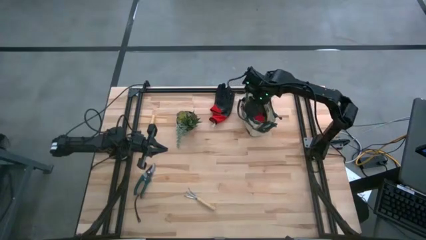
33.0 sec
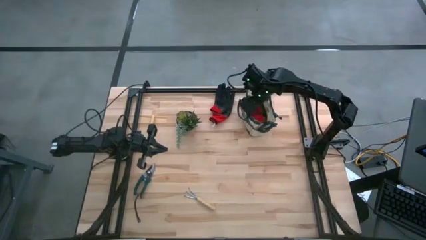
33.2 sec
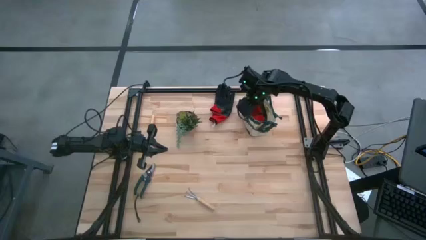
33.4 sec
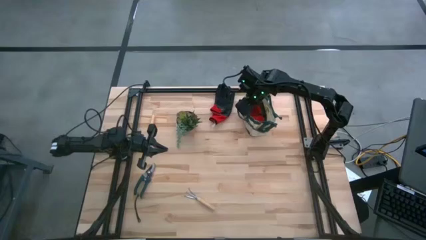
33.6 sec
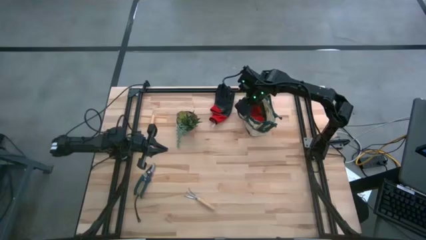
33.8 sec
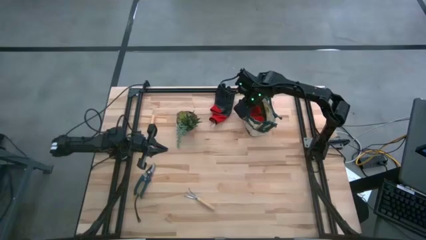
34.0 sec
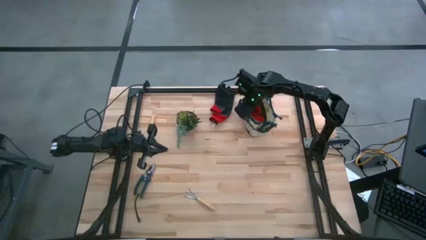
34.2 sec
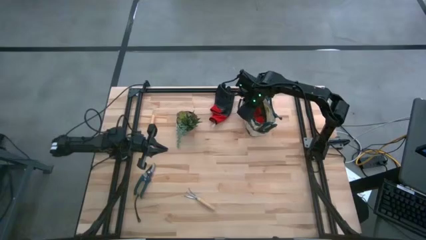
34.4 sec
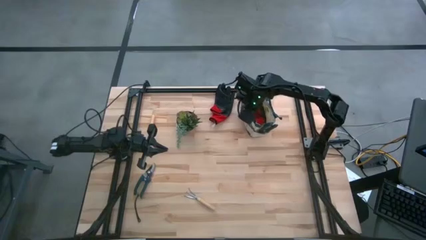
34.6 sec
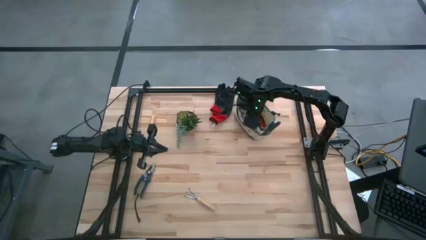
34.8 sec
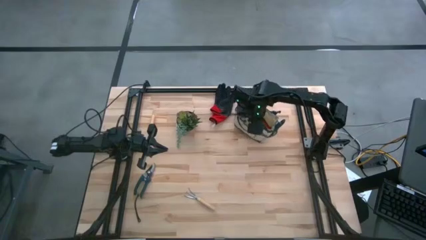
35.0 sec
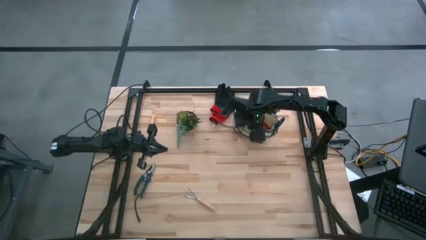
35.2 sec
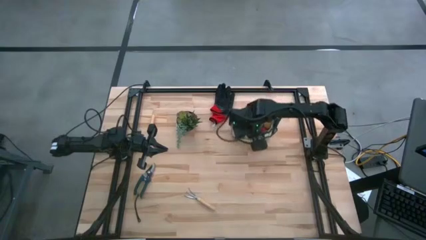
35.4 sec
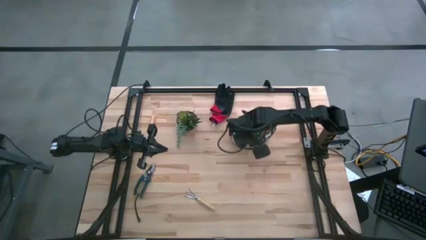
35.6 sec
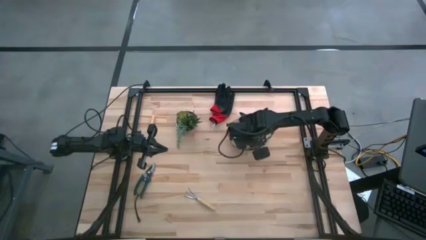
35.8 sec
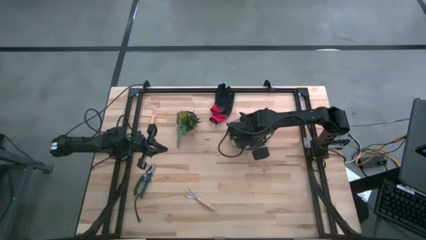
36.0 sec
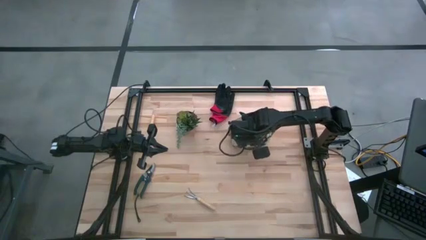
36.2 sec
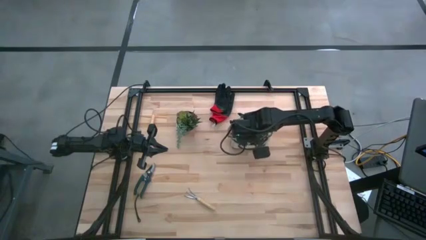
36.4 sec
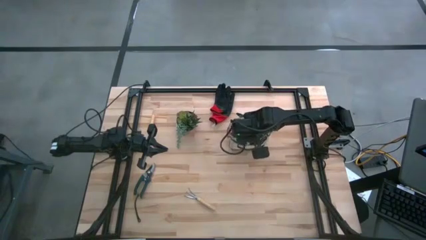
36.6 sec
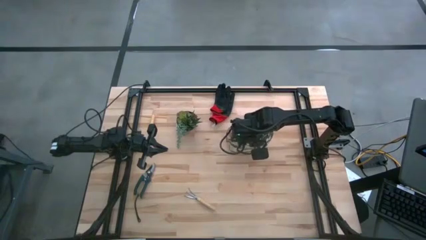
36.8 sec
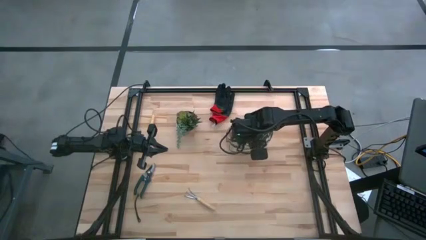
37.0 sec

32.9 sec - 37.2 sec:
Task: Pick & Place Garden tools in Gardening bag
Adjust the gardening bag

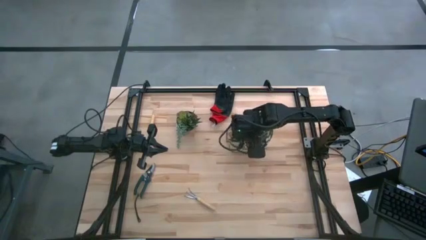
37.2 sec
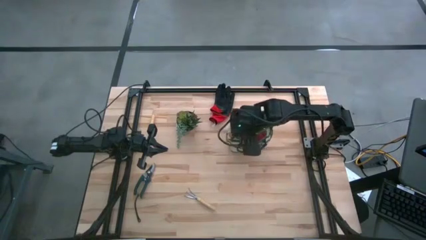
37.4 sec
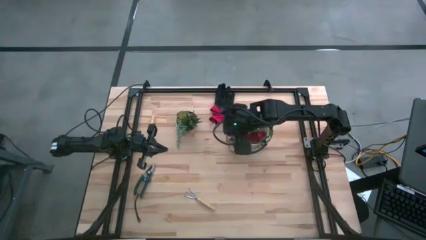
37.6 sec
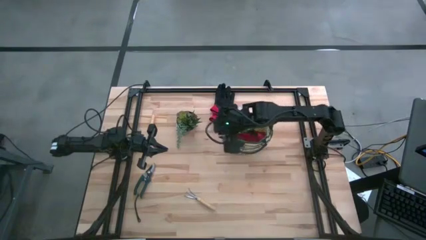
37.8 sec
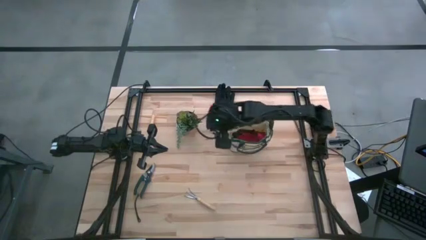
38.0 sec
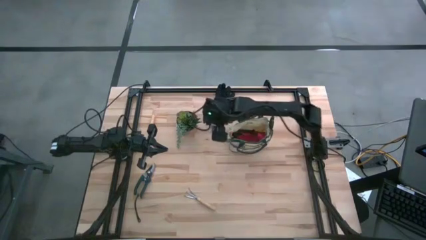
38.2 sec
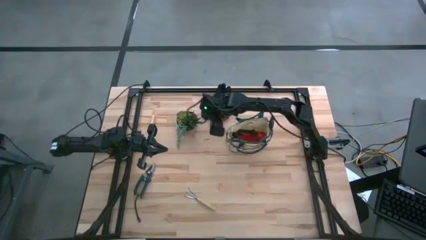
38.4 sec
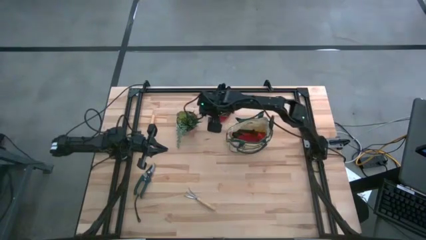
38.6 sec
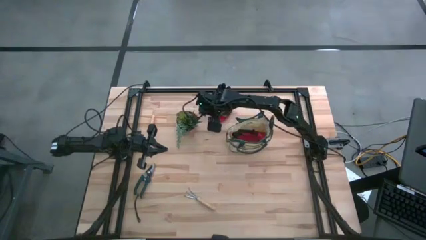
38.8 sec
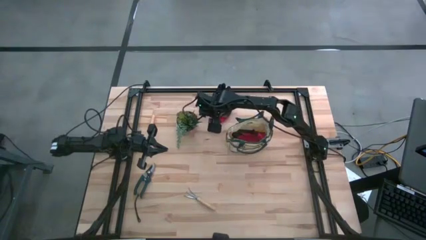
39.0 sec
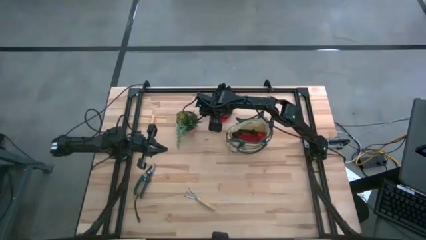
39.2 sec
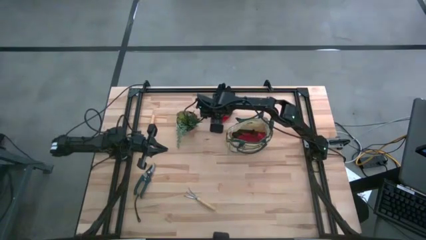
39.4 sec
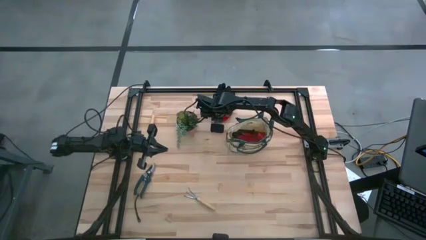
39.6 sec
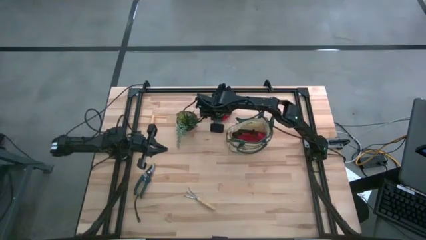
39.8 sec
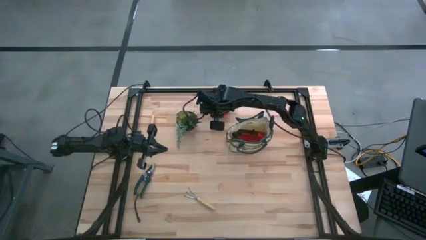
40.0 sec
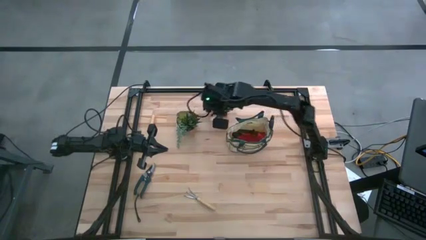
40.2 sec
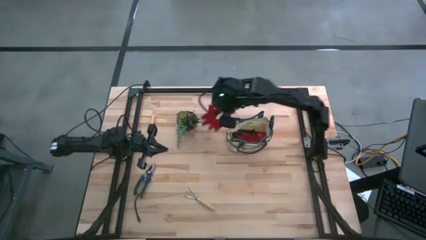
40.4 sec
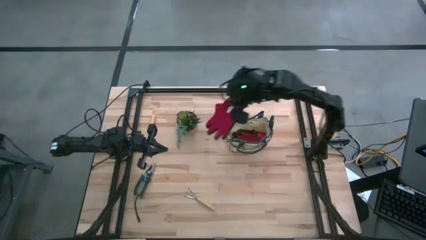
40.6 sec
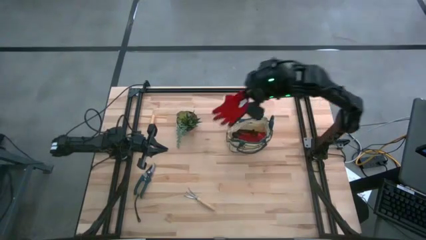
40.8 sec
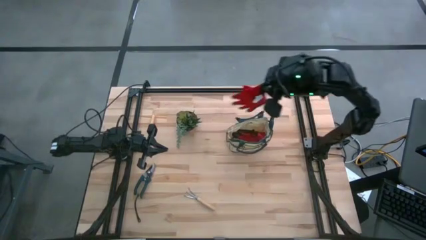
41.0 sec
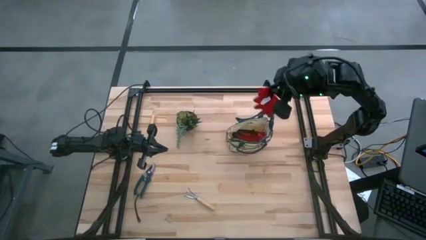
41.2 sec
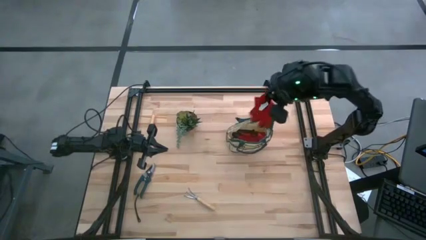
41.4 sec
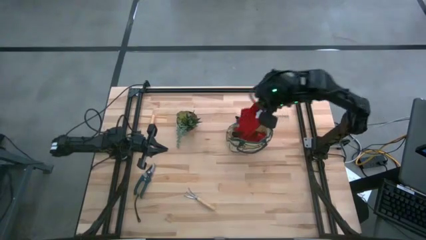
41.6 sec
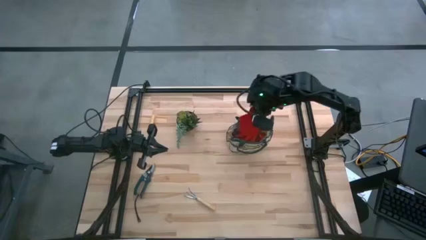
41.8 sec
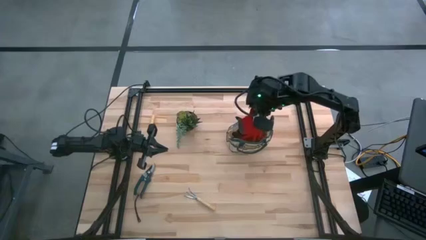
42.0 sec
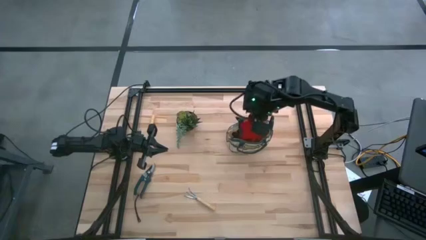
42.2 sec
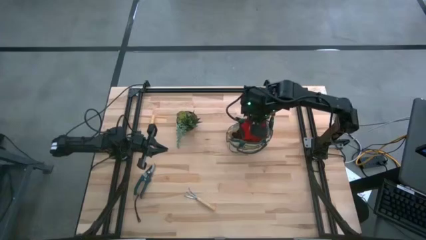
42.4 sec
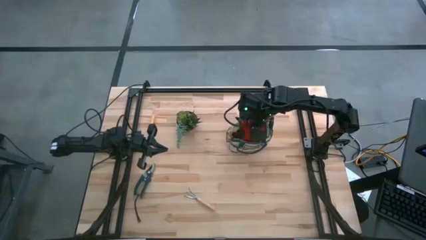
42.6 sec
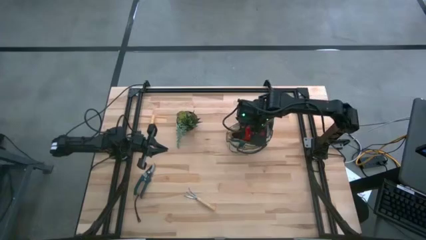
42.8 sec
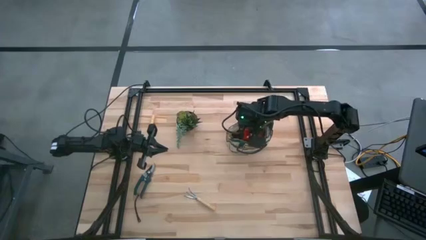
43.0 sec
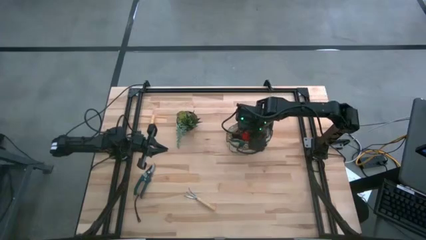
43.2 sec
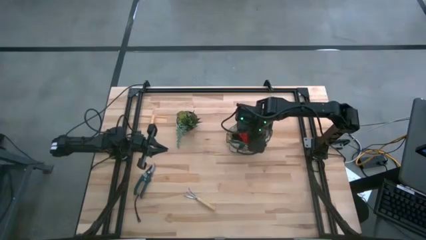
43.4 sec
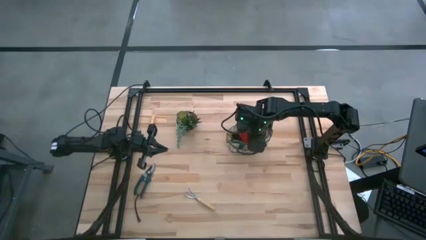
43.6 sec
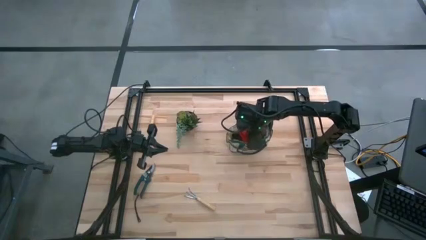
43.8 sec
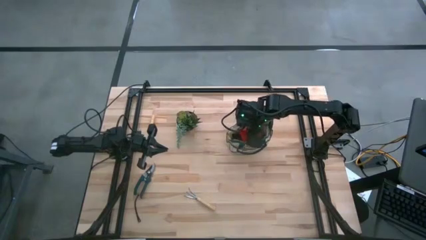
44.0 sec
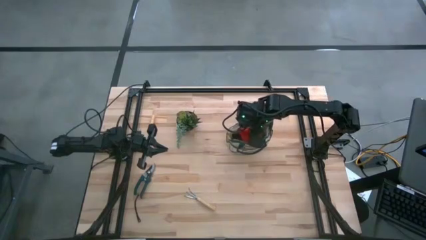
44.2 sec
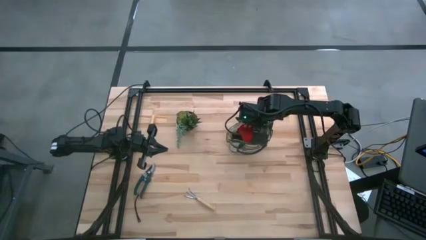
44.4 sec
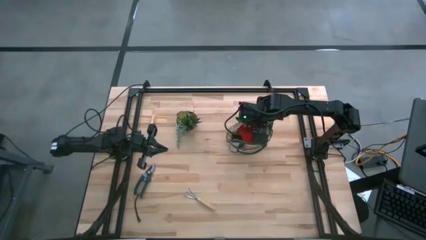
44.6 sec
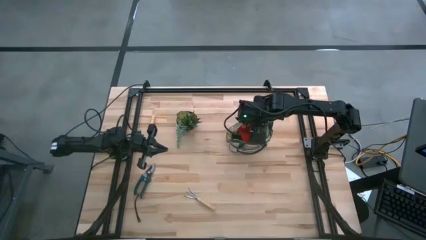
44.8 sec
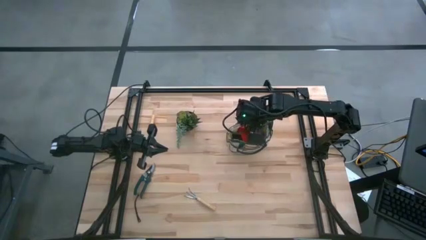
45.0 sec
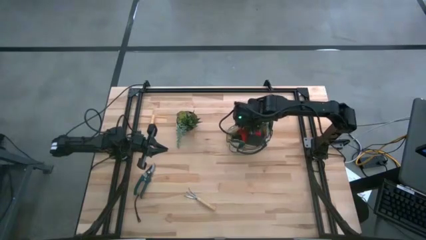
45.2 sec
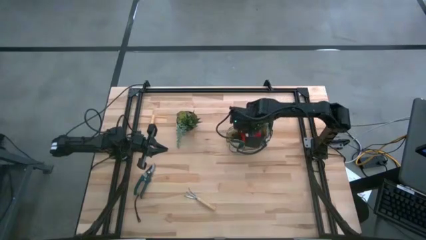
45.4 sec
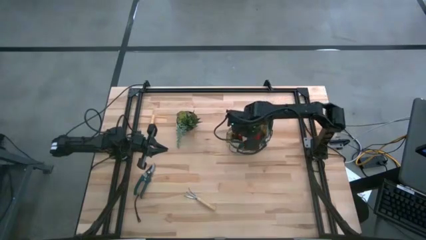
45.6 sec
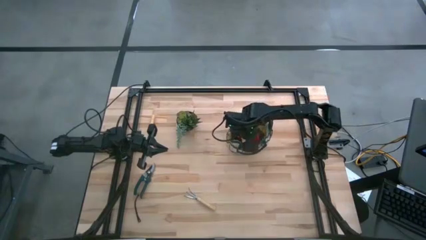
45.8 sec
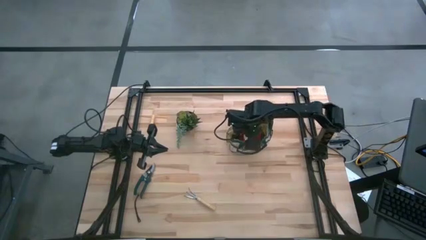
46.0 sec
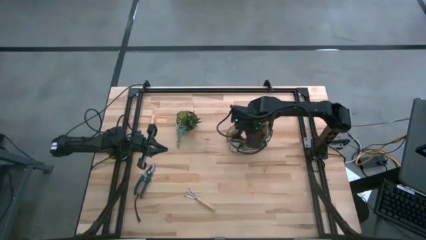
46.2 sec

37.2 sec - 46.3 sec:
Put the red gloves into the gardening bag

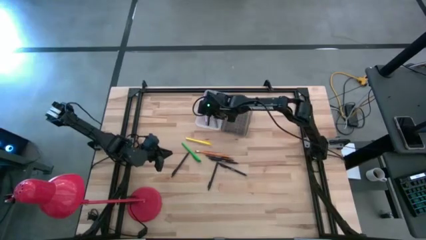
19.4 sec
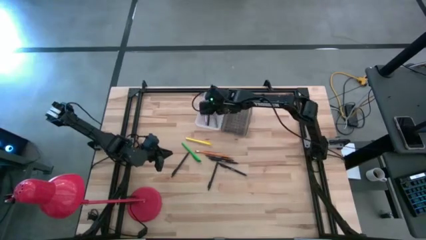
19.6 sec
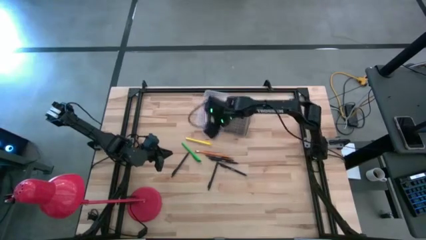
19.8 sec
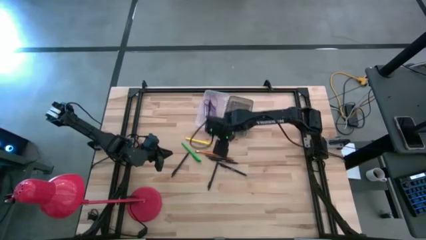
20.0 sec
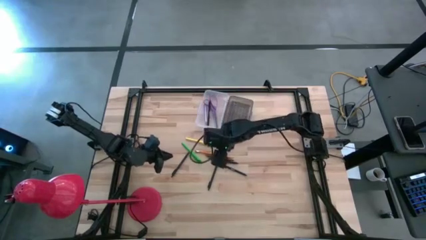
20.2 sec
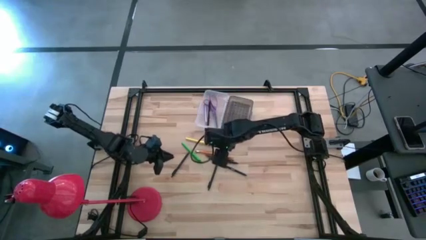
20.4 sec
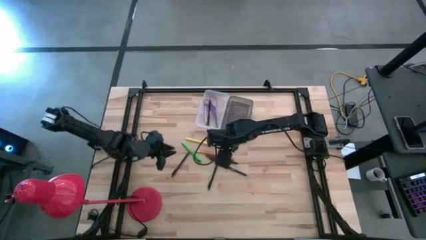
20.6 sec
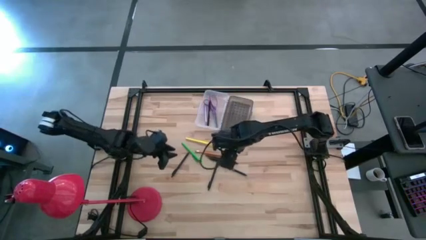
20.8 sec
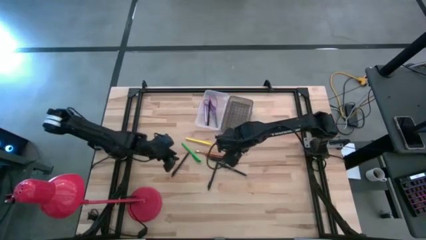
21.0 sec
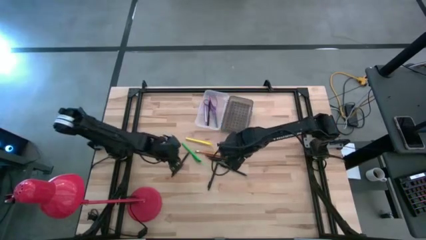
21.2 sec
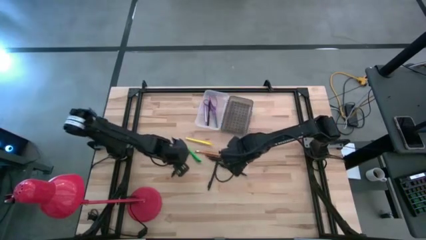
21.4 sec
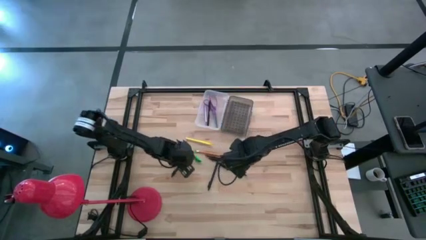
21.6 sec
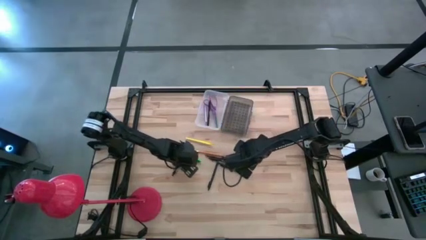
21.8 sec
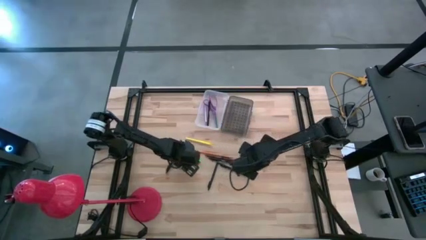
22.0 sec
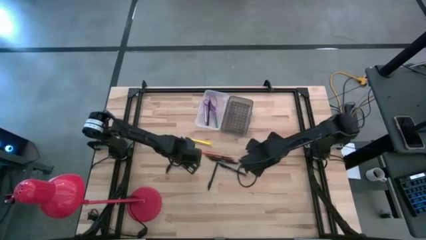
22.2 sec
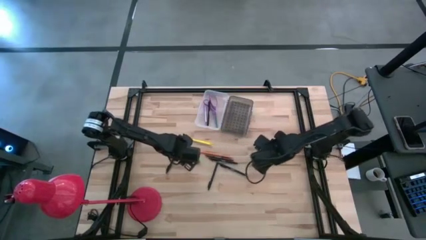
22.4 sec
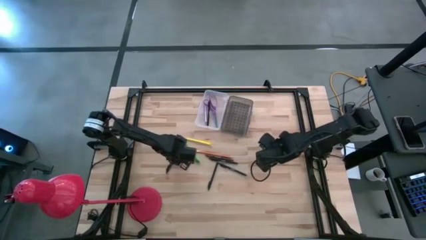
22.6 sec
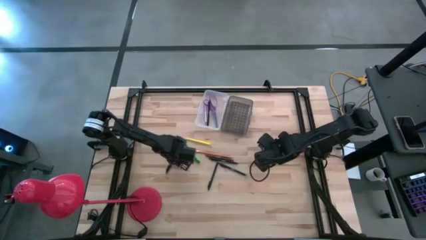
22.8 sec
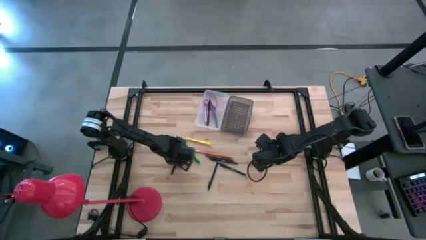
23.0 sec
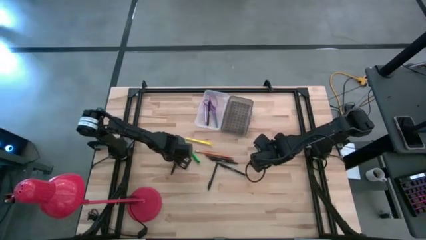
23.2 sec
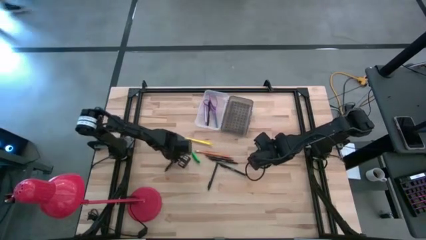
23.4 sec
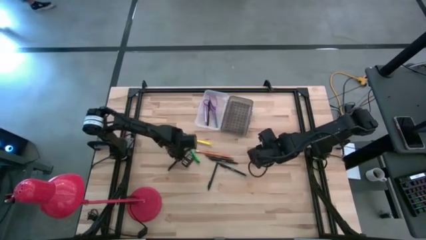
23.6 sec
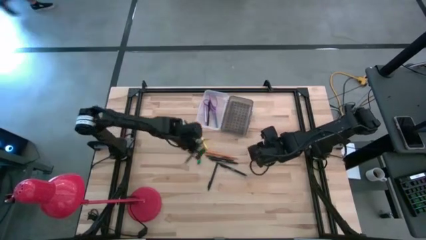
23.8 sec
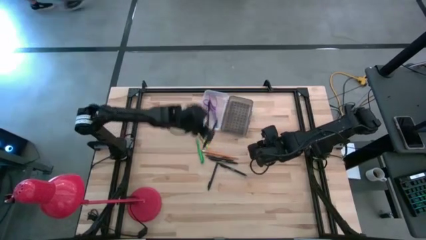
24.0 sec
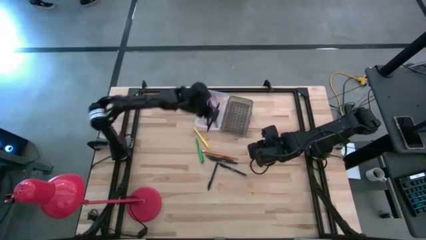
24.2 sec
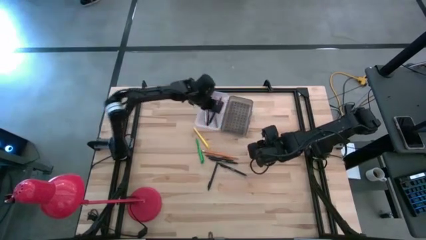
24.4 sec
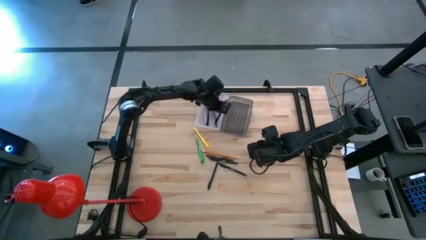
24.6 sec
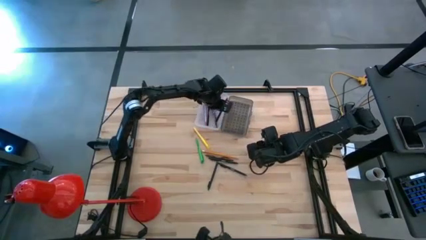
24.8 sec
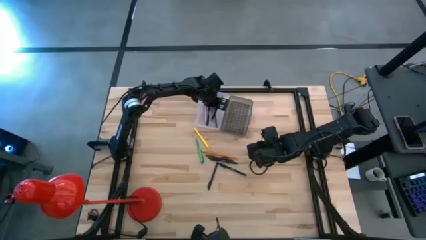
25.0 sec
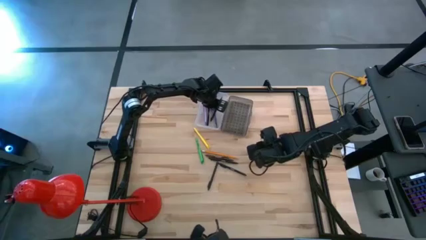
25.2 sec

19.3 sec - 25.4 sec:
Task: Pick & place school supplies into a supply box
Put the black pen into the transparent supply box
